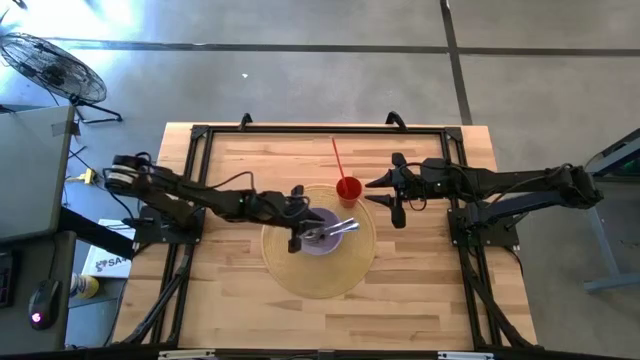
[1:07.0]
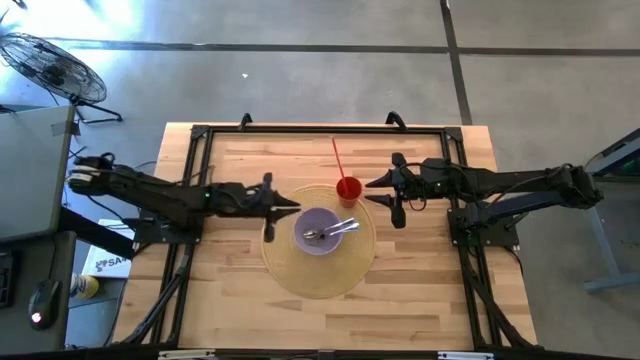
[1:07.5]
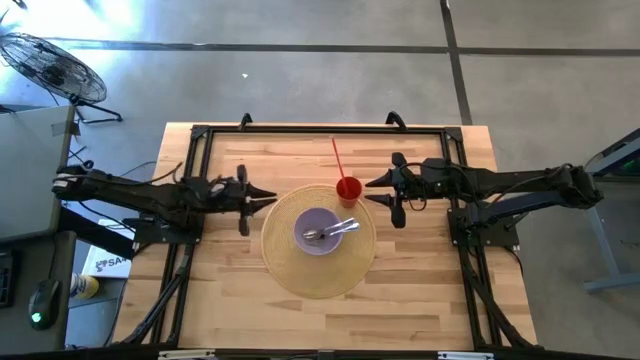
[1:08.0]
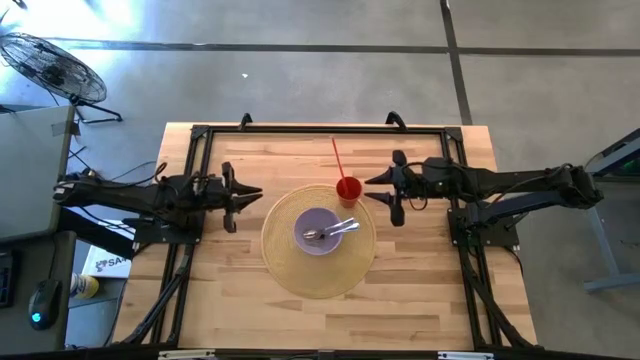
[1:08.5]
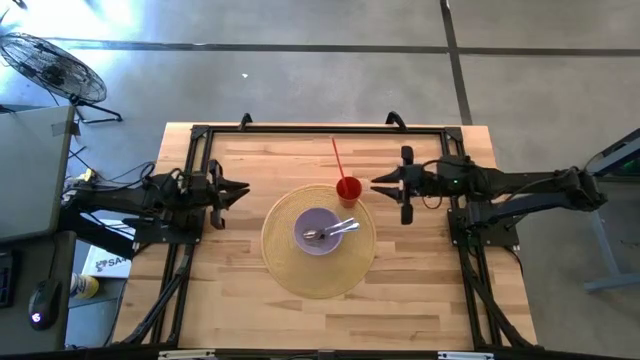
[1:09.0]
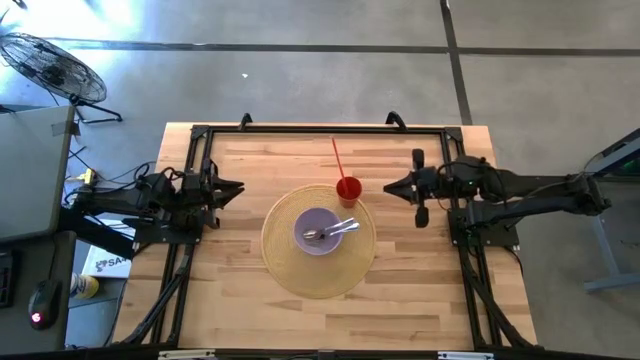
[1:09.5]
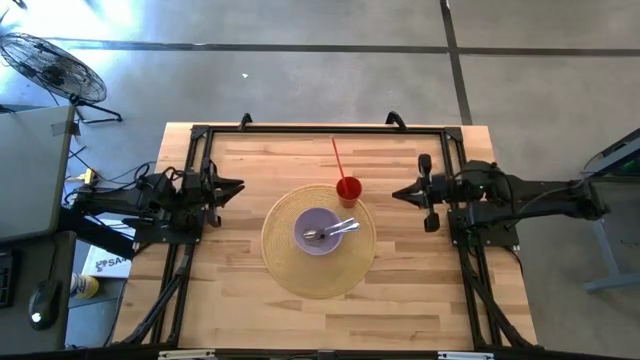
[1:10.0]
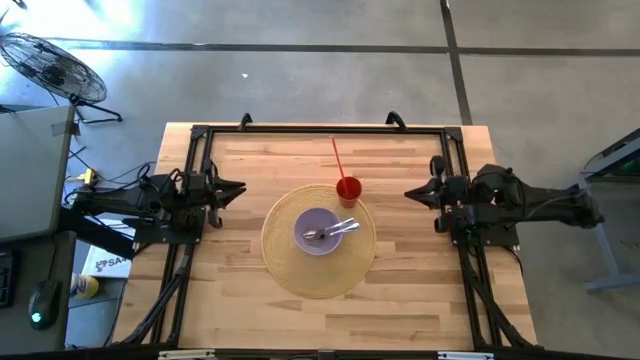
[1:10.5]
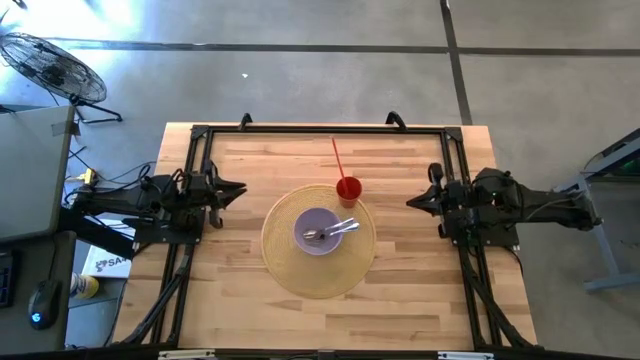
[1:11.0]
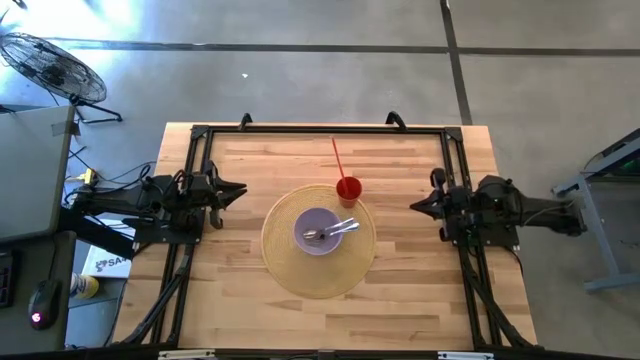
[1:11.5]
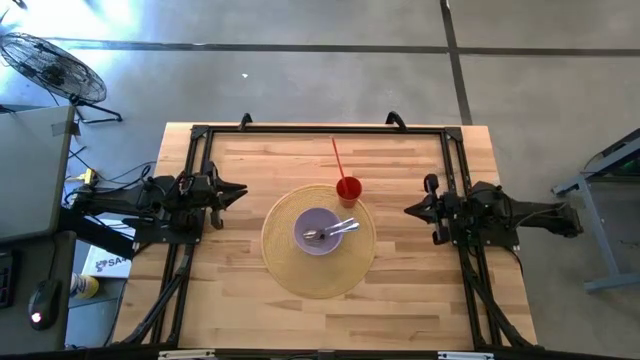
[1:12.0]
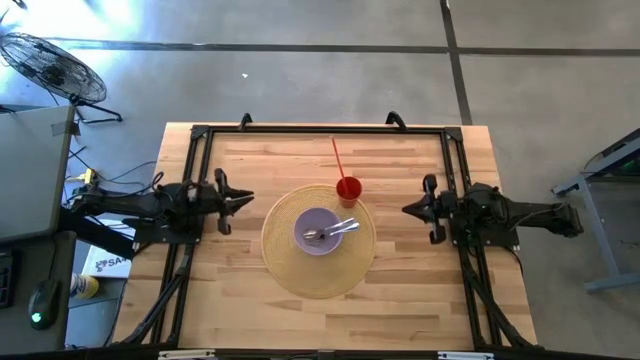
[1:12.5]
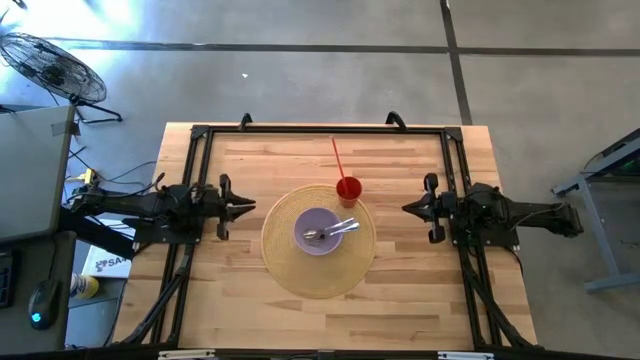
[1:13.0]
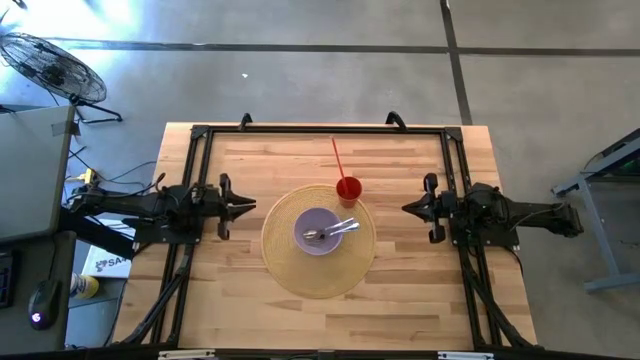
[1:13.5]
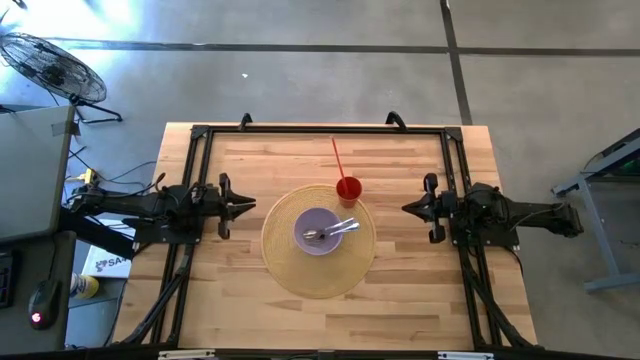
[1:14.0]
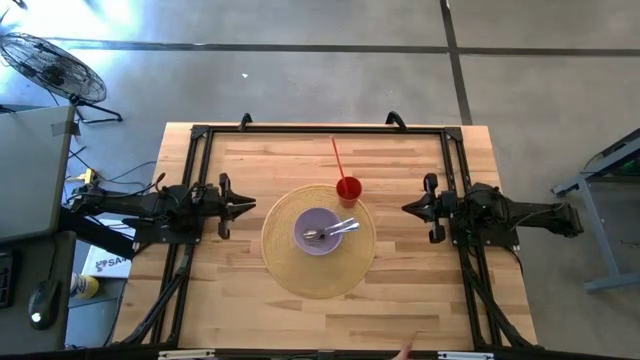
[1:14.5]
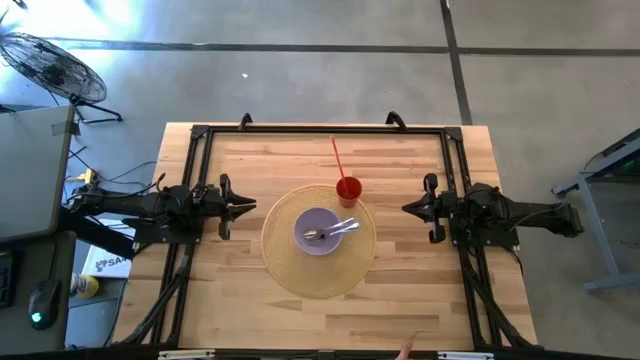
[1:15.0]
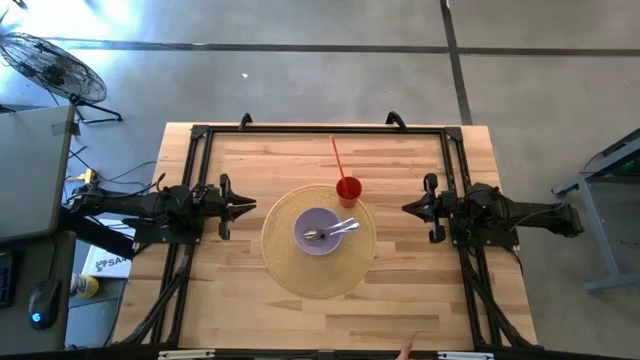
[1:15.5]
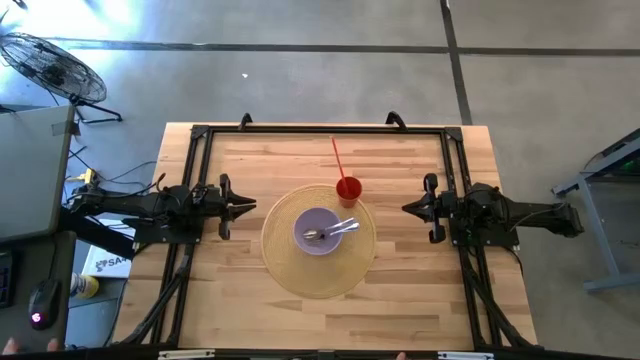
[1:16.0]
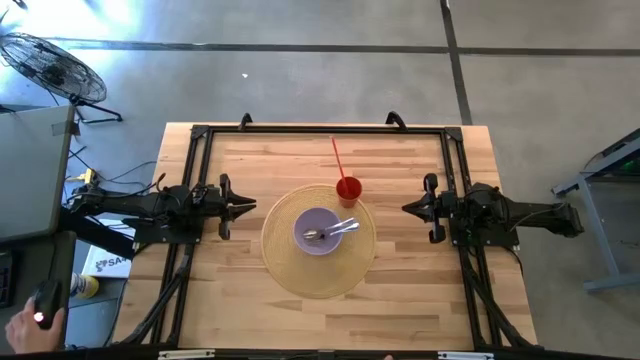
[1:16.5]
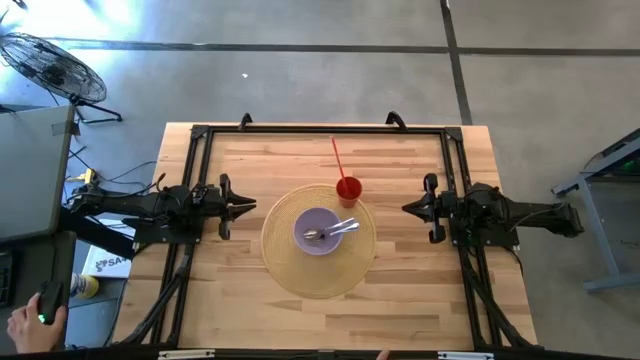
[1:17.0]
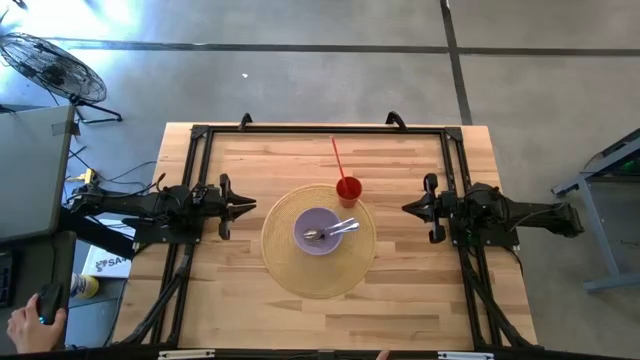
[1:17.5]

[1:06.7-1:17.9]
Task: Pick & Place Utensil
Return to Home Position

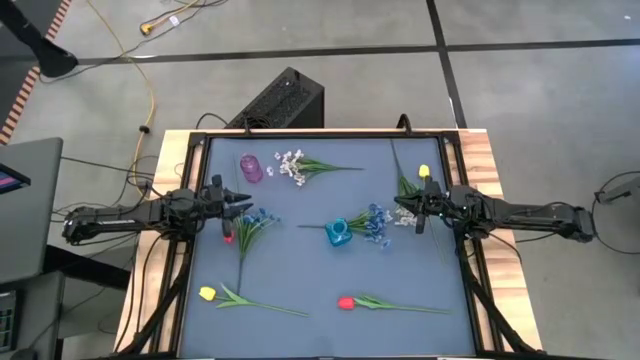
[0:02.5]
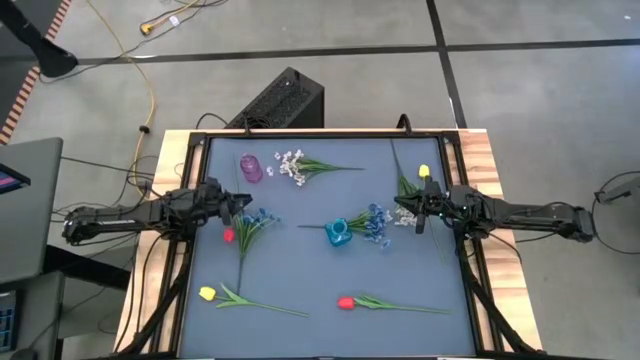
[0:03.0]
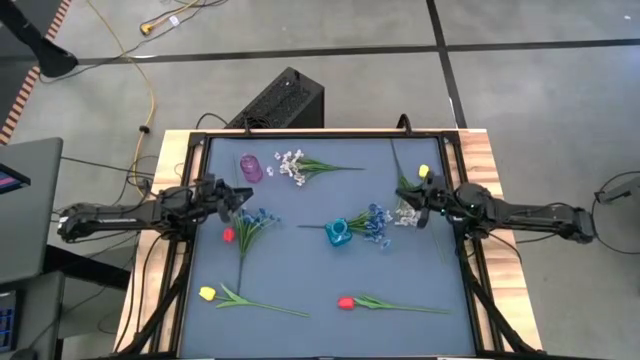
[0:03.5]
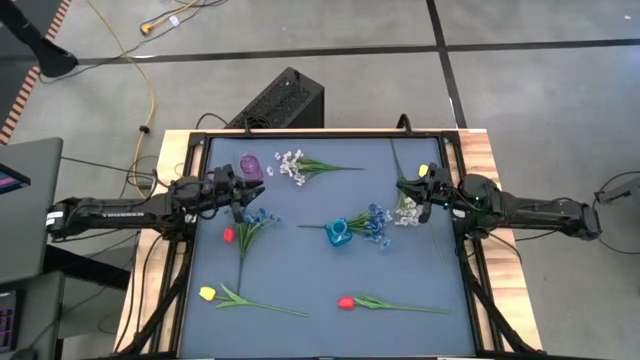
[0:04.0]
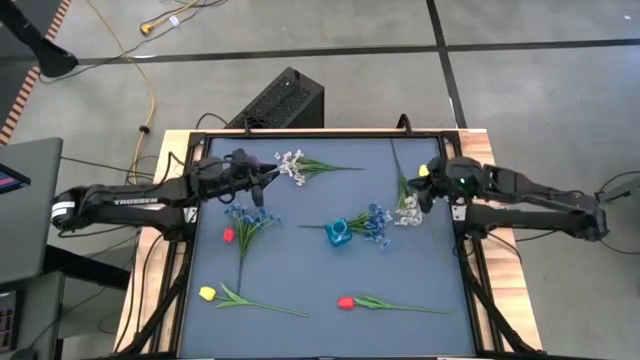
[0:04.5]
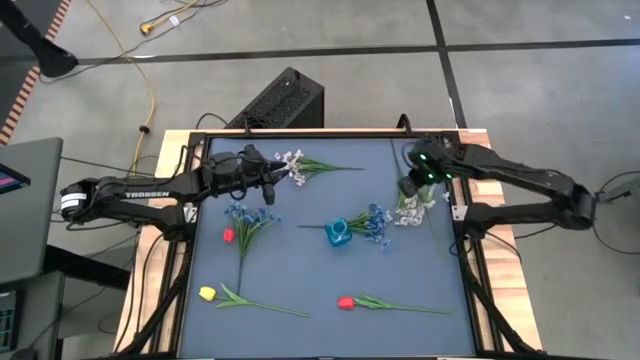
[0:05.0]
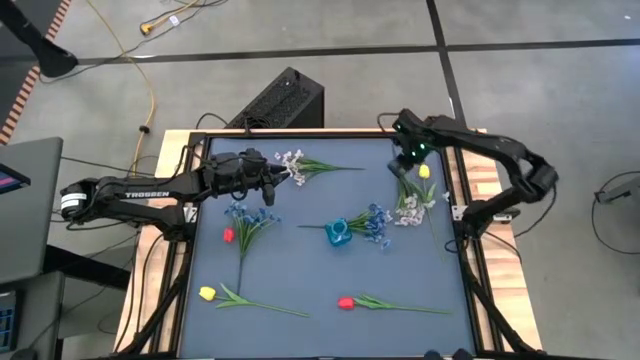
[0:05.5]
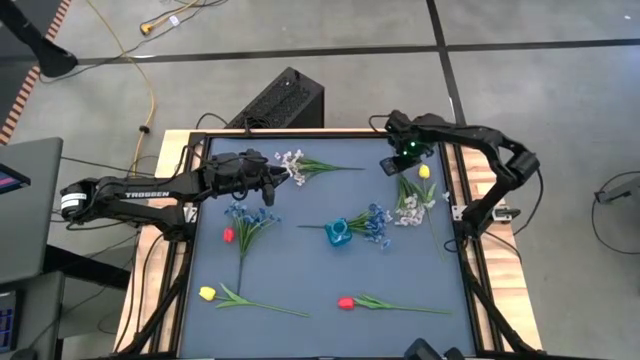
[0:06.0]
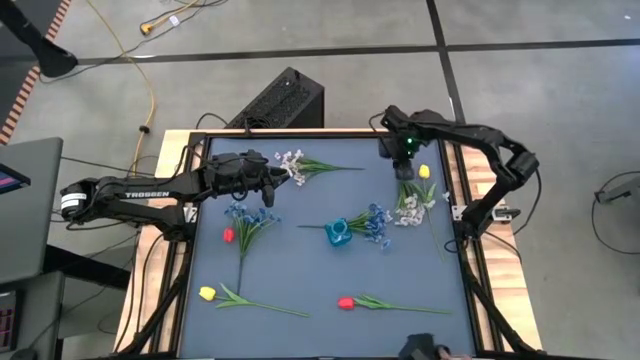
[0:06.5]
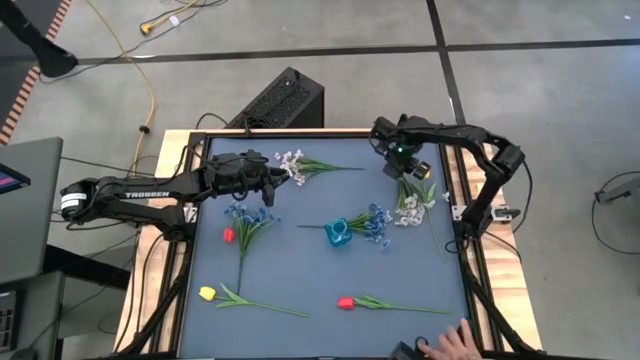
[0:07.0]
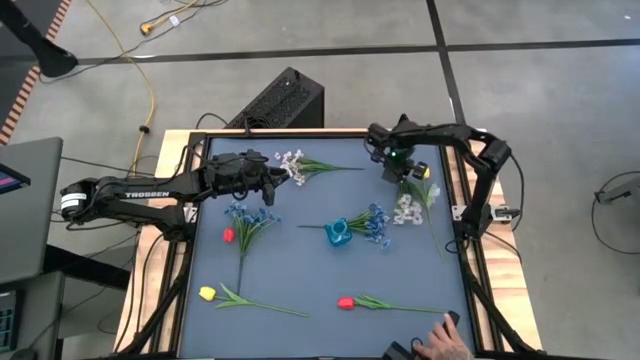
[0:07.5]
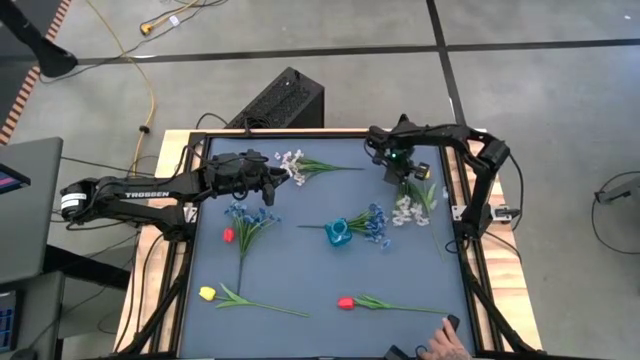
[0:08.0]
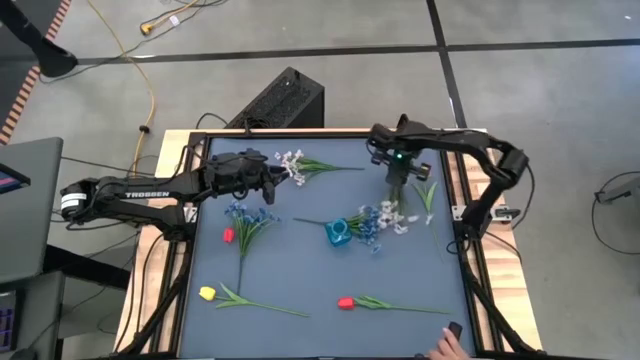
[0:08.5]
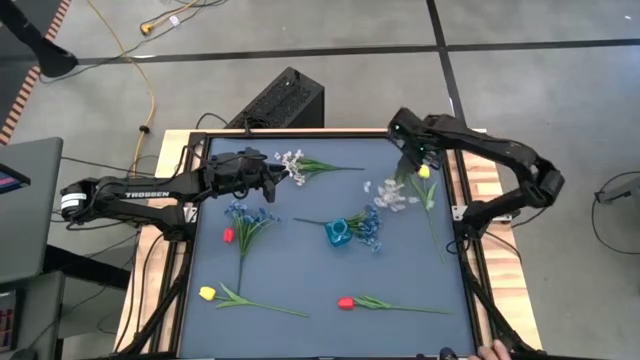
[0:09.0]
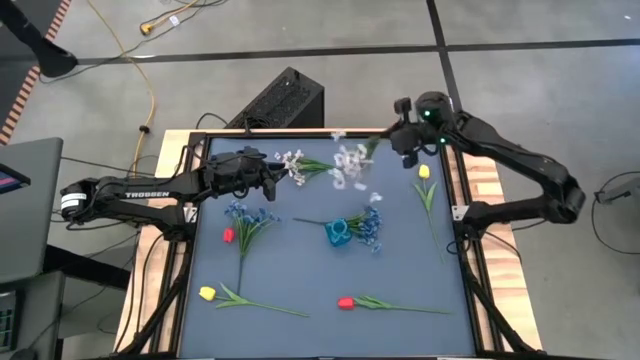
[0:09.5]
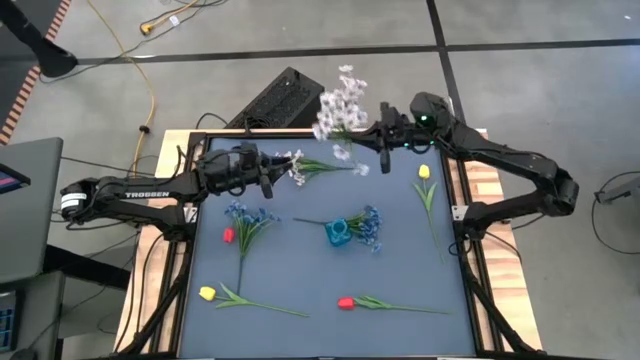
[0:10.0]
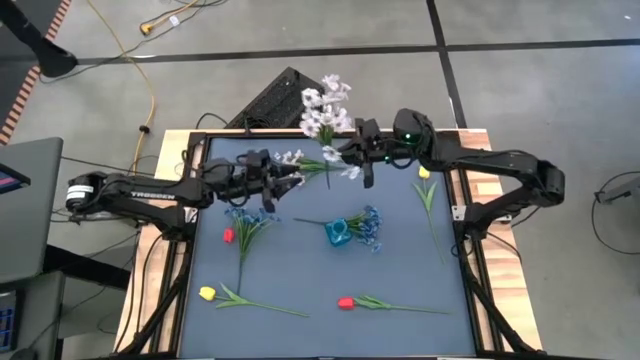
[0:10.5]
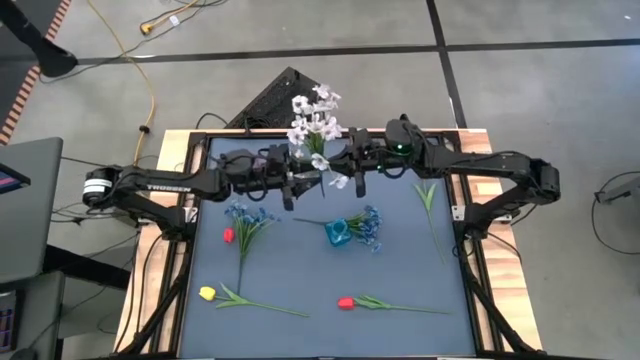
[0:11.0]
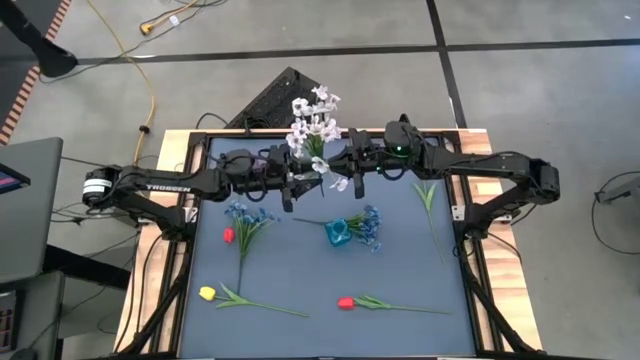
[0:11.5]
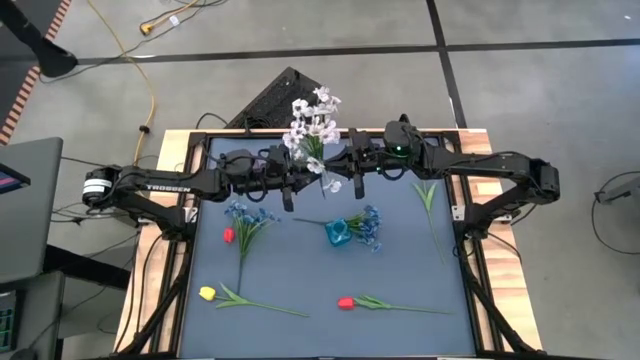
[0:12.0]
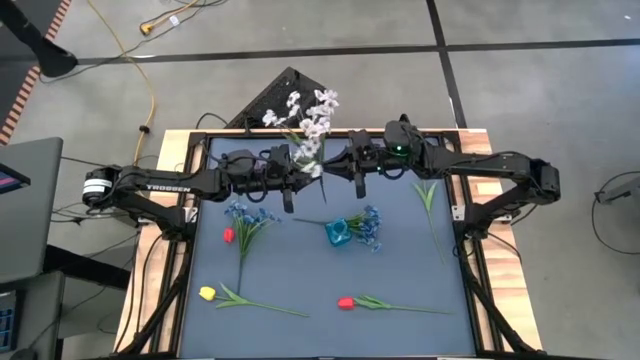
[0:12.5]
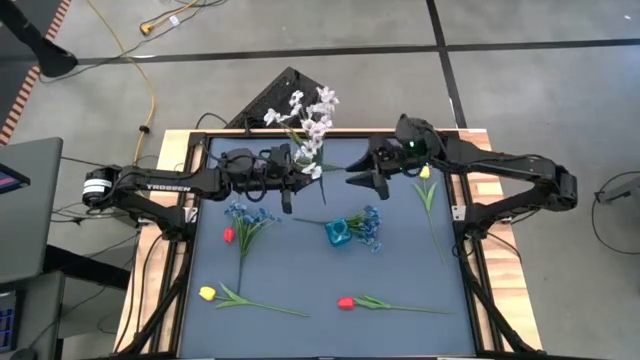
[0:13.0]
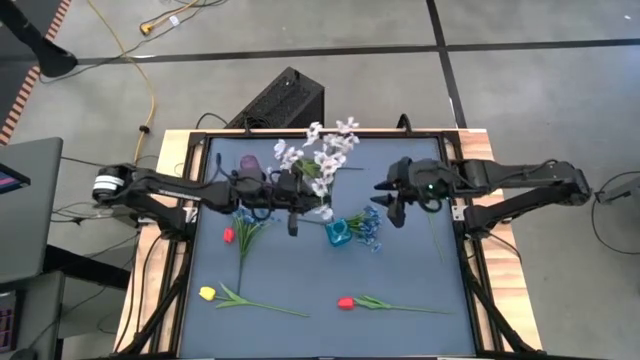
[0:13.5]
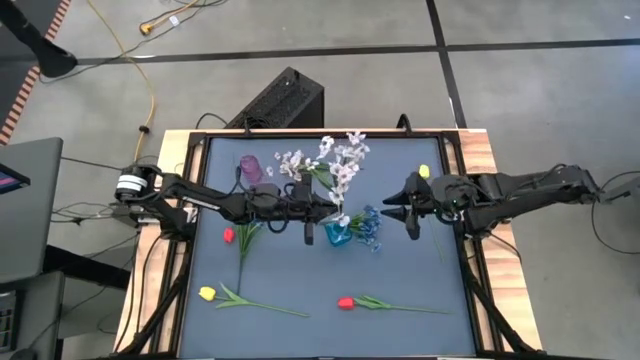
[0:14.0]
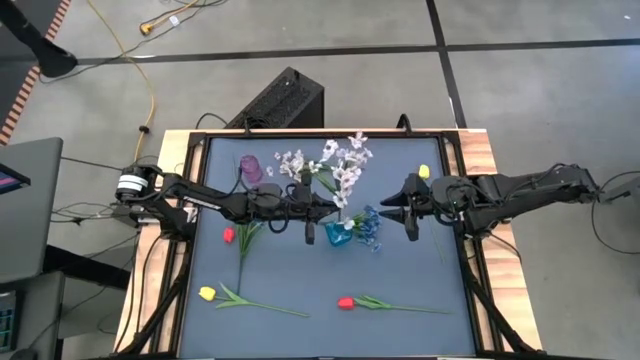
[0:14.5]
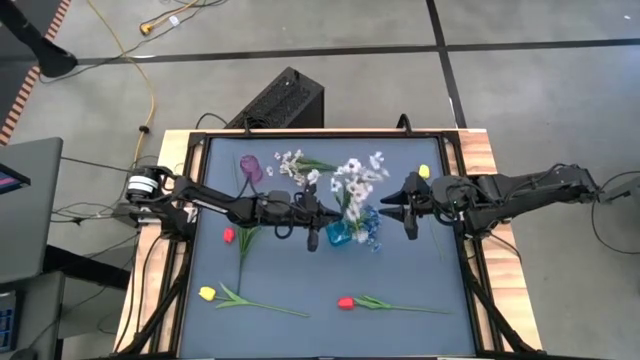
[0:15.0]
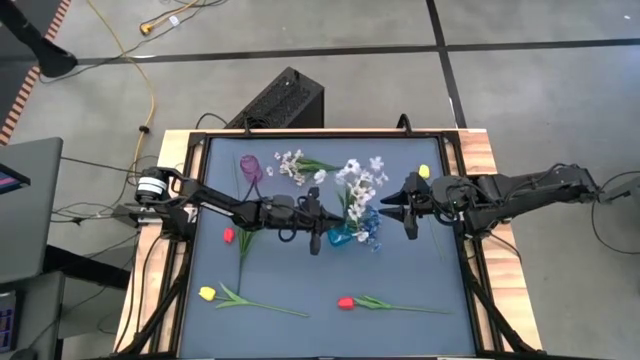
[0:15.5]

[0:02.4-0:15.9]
Task: Sort flowers into vase by color
Put the right white flower into the blue vase
